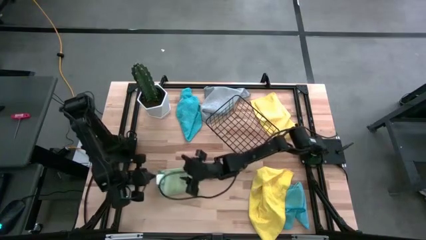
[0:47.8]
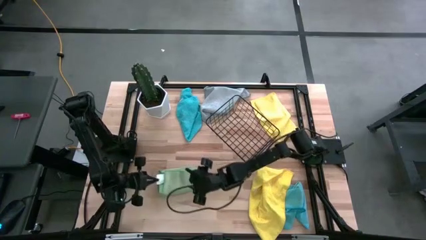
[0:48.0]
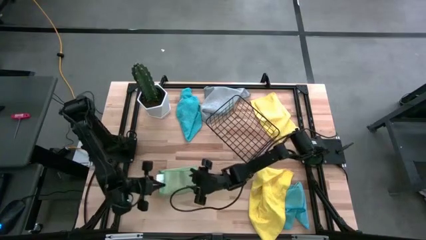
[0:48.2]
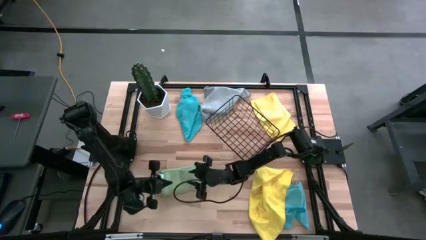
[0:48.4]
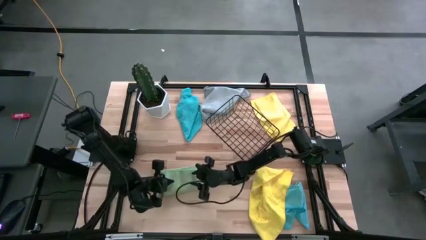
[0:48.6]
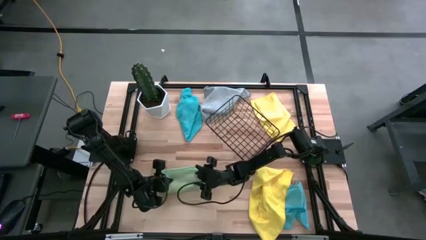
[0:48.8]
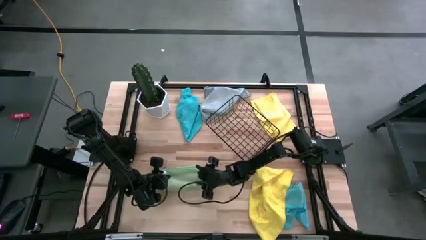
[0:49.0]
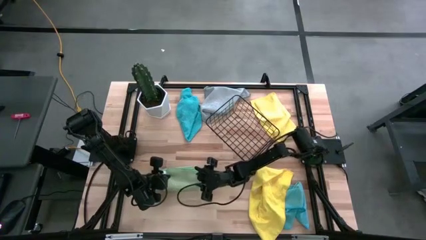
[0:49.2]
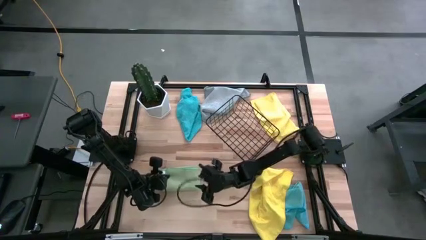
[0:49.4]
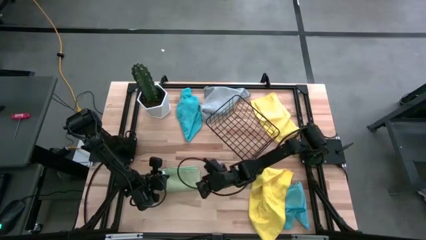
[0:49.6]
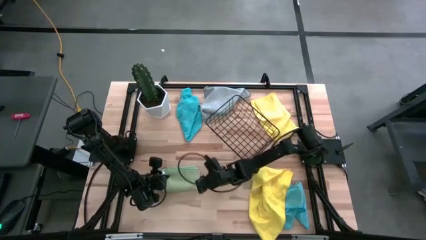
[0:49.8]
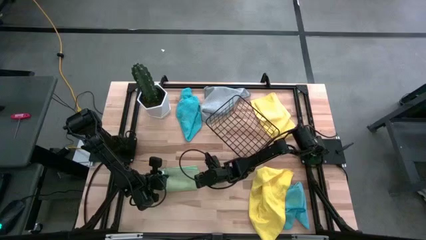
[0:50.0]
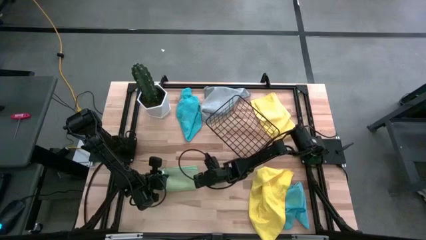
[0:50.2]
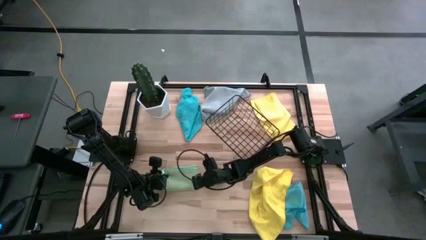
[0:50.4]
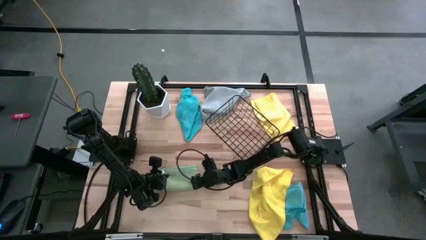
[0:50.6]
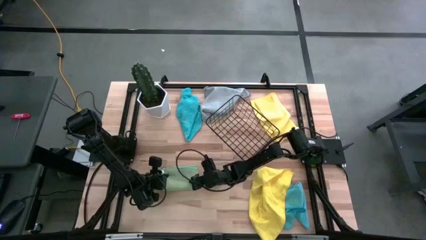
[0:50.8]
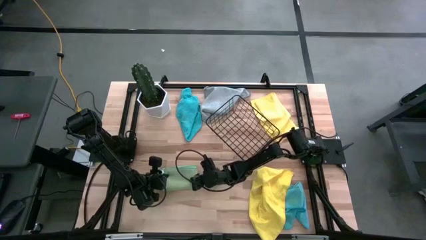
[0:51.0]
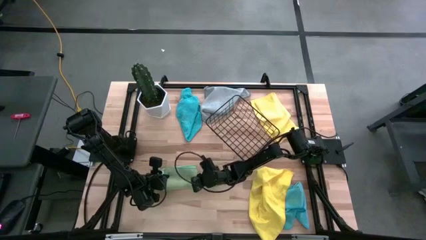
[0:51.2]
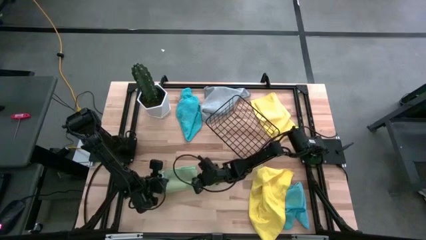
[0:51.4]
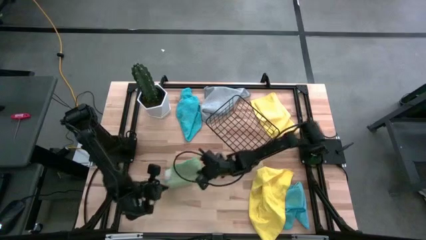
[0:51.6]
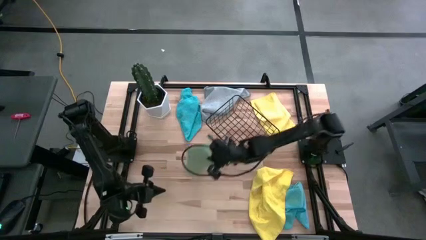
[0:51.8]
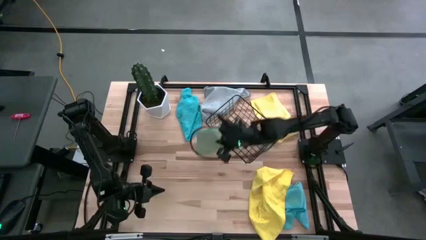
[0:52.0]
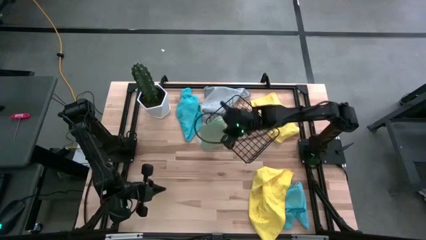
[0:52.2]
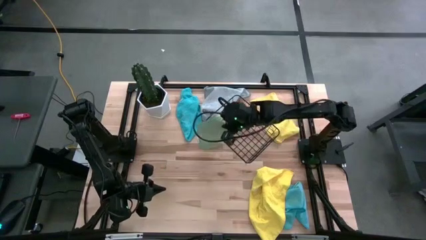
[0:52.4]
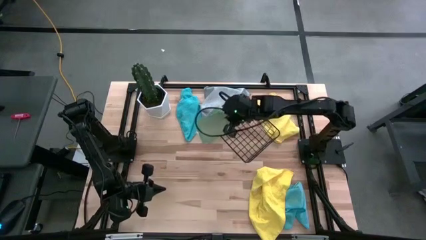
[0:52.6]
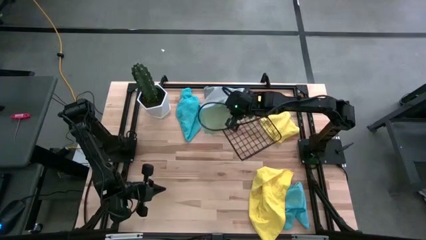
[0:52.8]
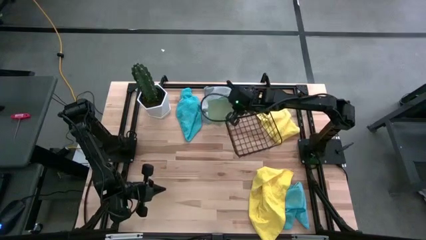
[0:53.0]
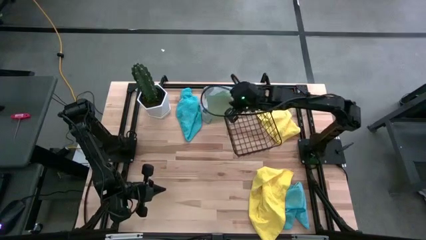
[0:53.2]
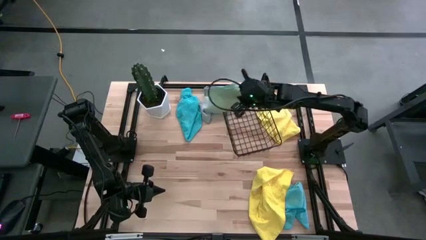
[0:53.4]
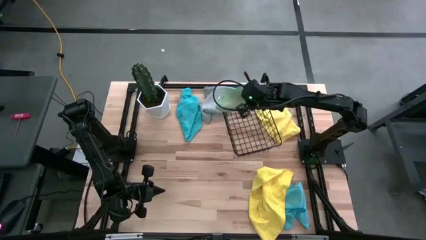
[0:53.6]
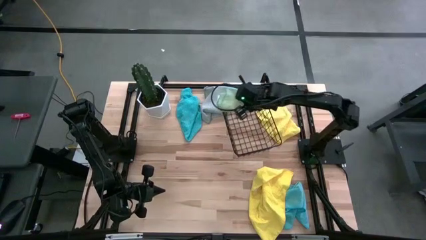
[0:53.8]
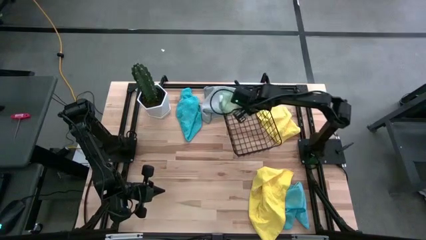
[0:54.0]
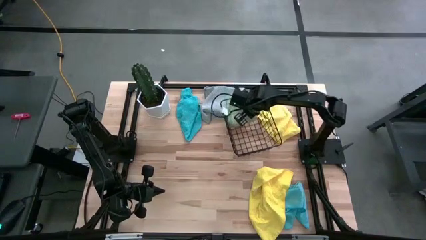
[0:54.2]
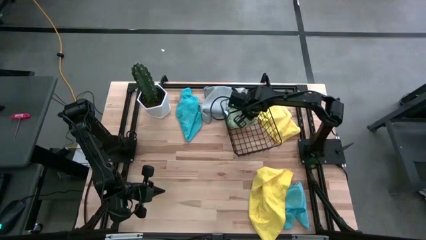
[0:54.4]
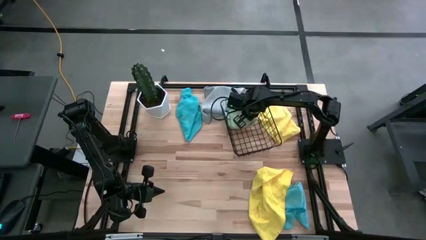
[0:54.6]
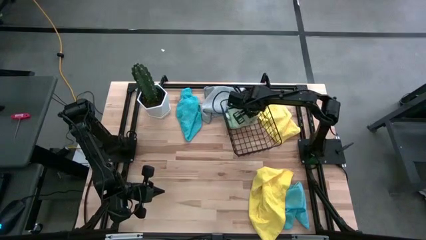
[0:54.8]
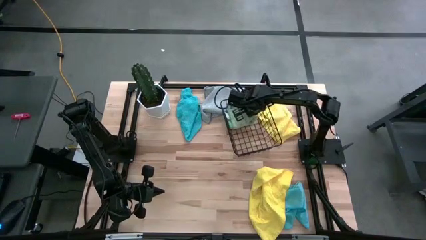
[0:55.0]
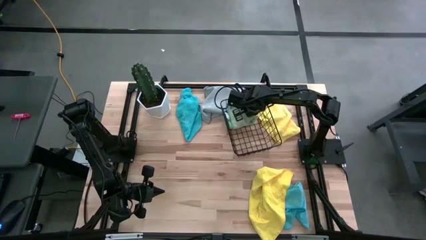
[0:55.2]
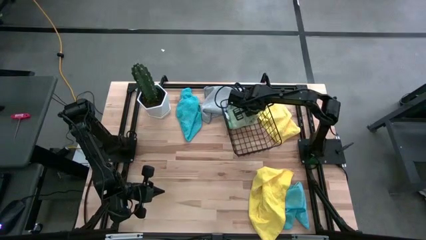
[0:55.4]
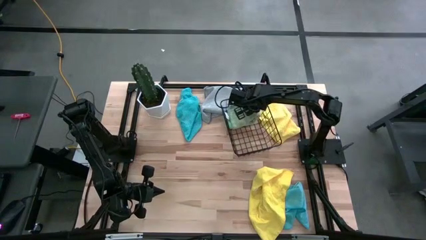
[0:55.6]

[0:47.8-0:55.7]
Task: Fold microfiber towels
Put the folded green microfiber towel into the black wire basket

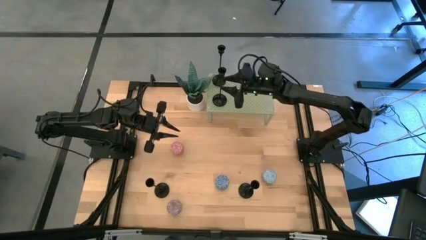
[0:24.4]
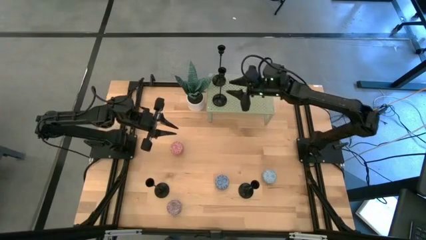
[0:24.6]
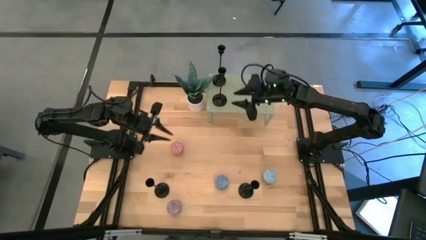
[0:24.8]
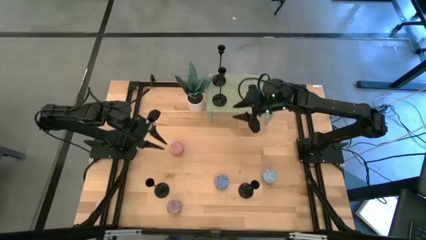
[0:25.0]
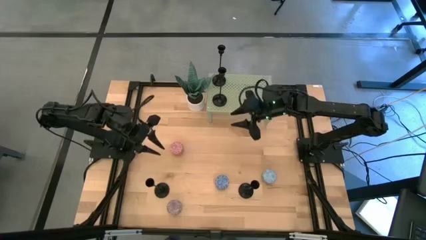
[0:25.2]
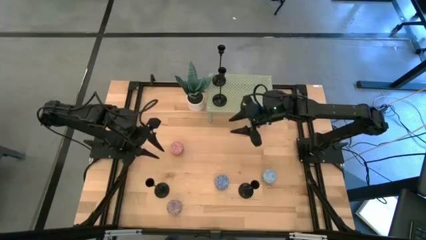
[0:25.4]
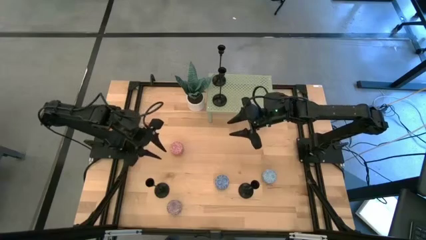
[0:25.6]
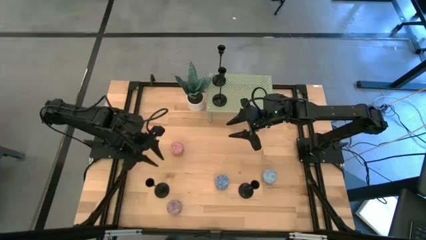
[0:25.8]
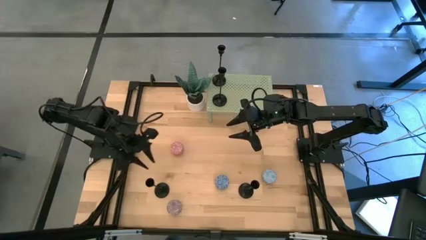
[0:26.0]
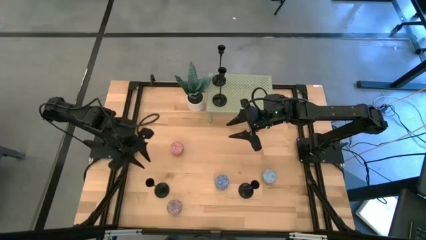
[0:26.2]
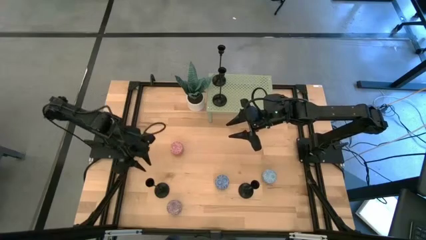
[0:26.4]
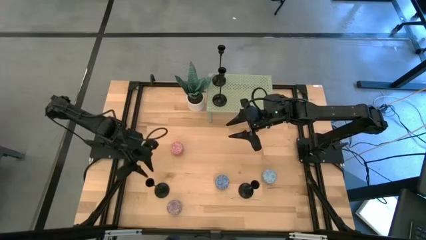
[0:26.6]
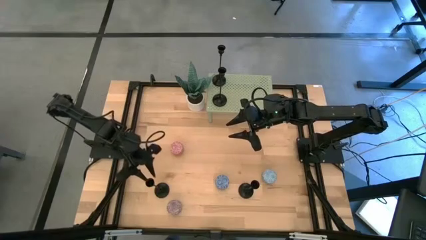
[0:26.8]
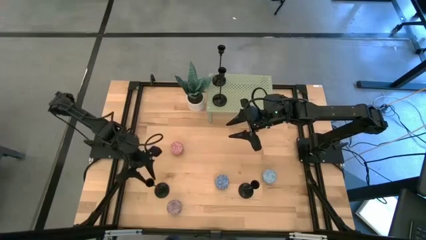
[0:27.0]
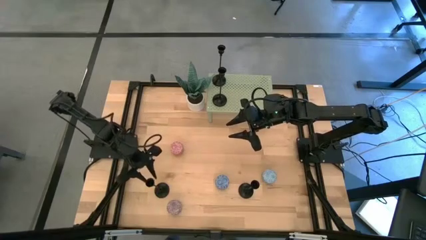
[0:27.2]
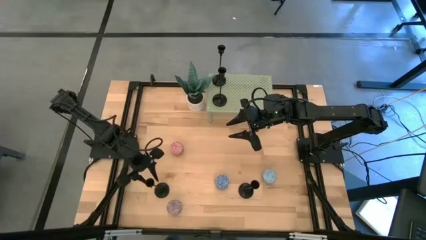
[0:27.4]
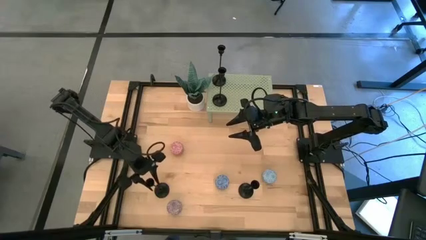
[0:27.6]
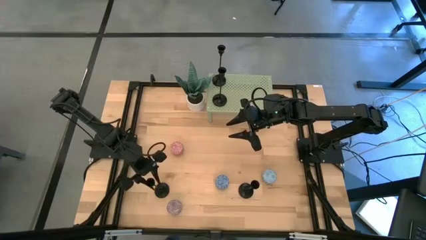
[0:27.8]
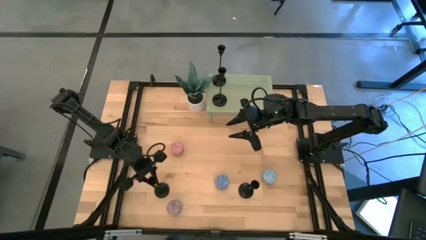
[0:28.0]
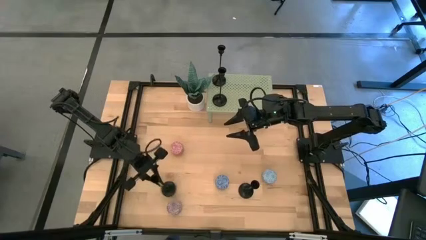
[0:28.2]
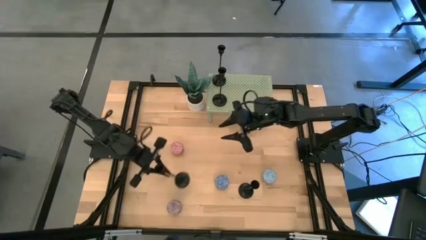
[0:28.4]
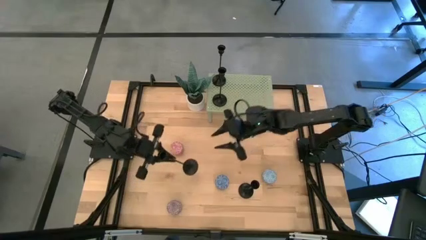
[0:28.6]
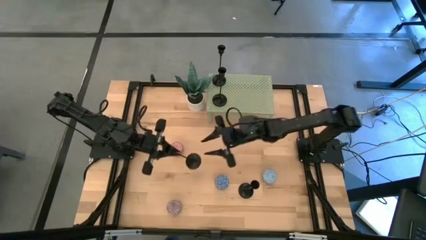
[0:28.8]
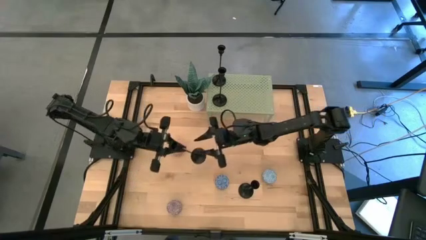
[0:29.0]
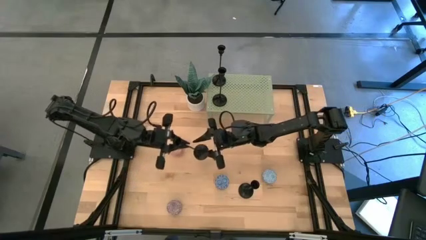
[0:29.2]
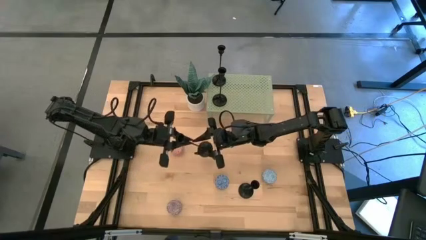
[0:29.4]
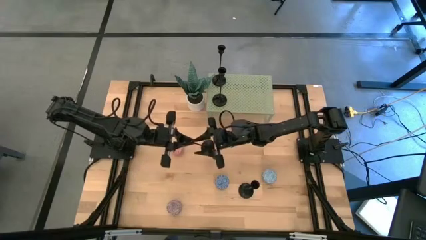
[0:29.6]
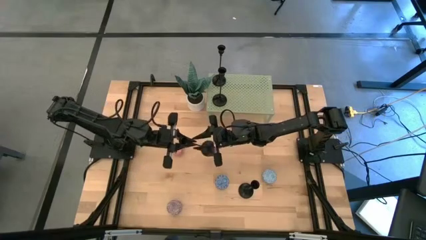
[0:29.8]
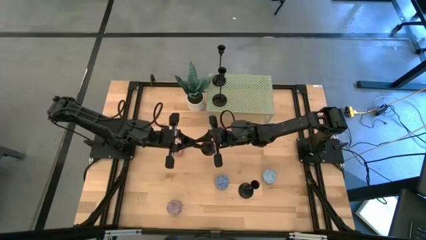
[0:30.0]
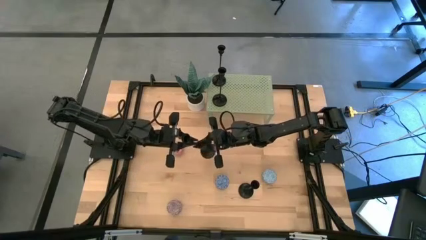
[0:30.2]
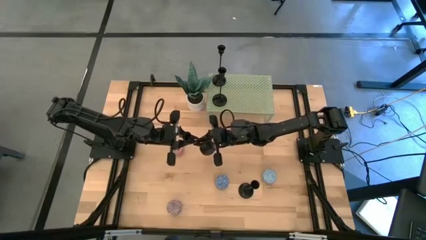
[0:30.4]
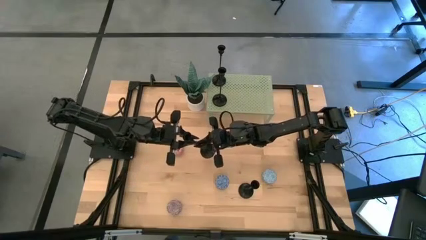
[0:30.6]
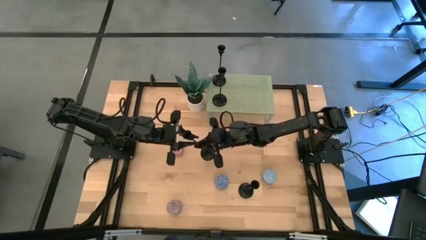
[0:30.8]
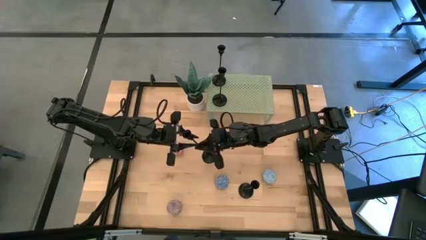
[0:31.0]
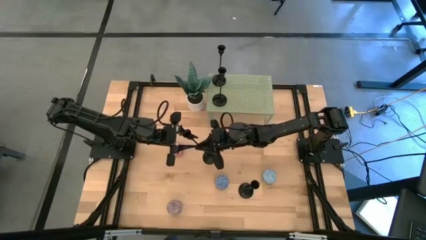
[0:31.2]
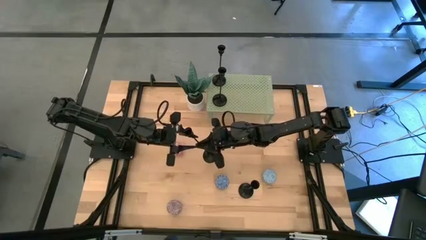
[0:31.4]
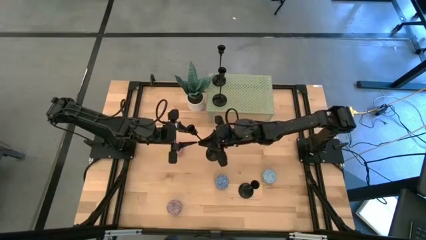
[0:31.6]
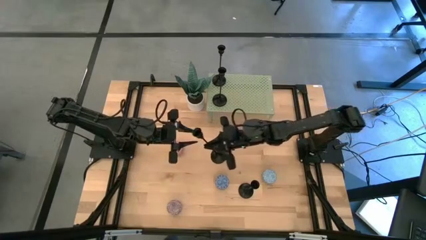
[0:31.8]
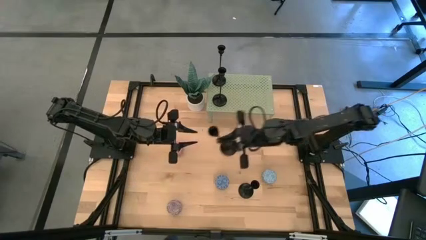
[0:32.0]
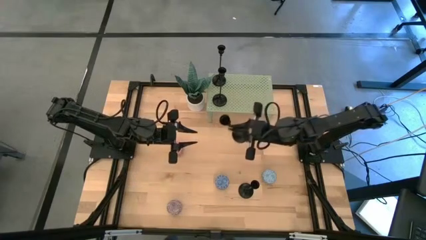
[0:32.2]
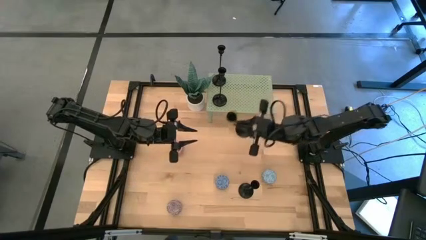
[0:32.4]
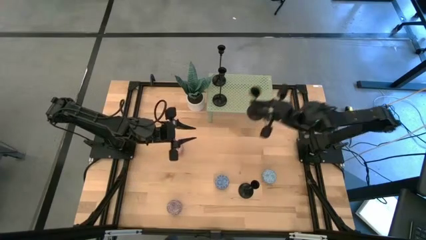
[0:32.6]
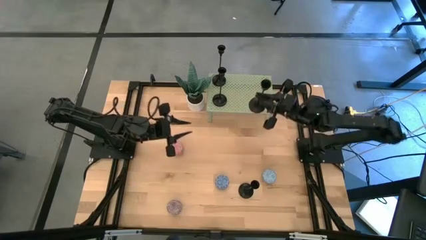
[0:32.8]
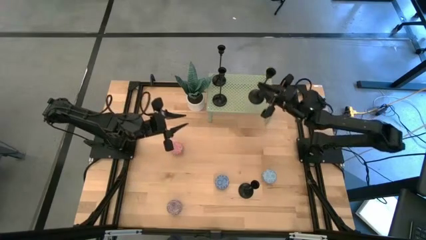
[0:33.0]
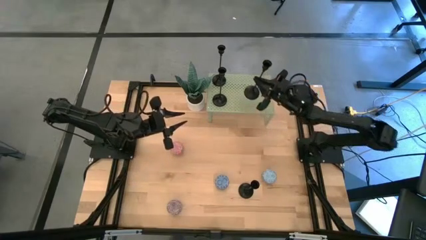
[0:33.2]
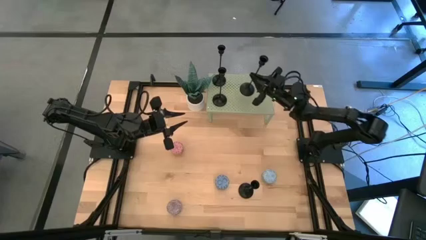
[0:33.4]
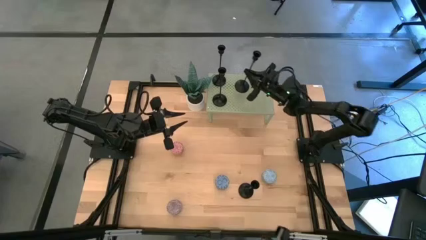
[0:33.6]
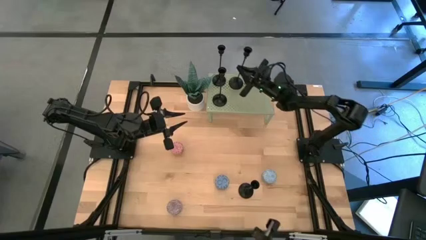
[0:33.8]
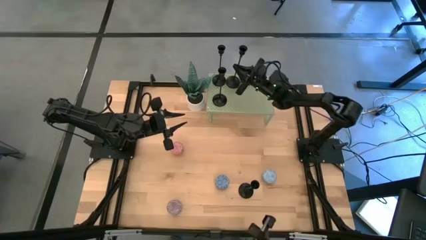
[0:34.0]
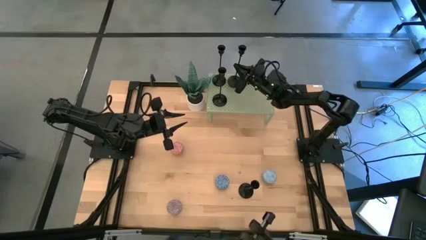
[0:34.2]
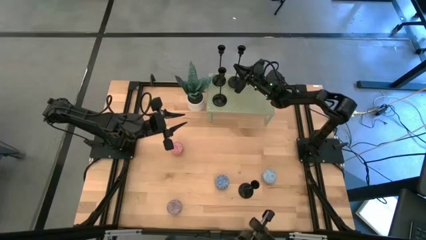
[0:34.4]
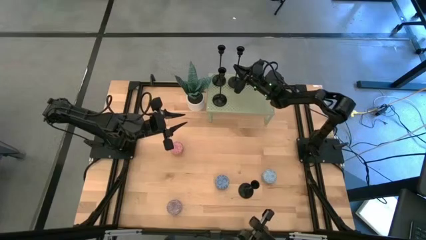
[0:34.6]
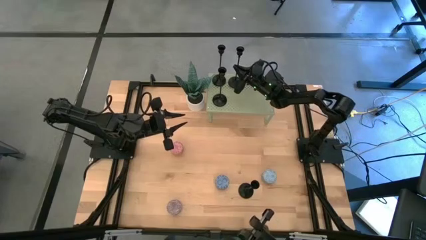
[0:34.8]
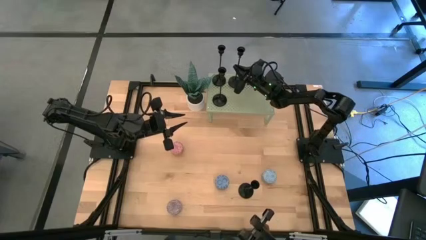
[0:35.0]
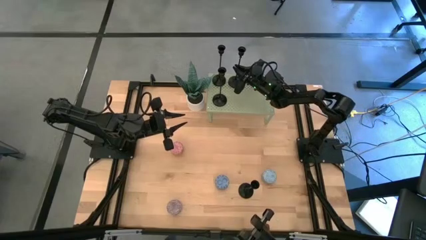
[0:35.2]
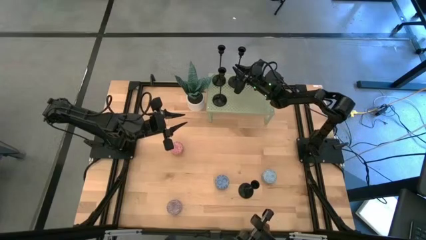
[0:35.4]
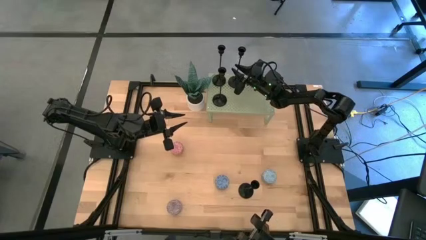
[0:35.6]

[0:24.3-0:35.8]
Task: Pick & Place candle stick holders
Align the black candle holder with the other black candle holder on the shelf
